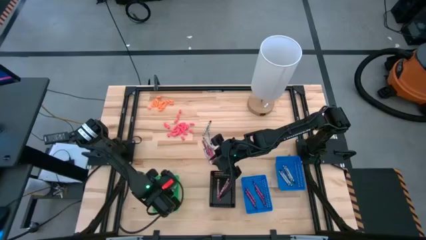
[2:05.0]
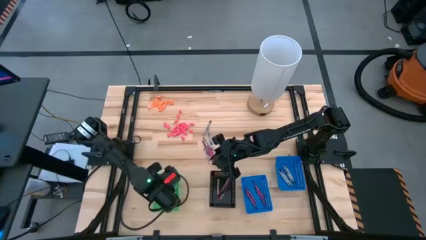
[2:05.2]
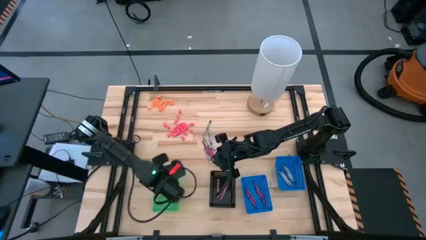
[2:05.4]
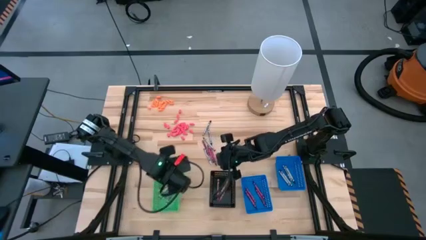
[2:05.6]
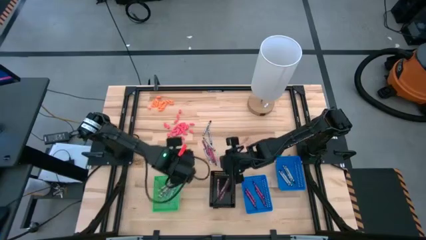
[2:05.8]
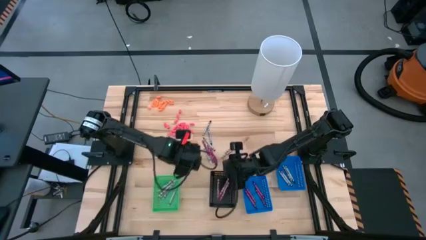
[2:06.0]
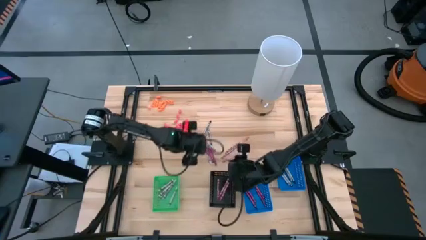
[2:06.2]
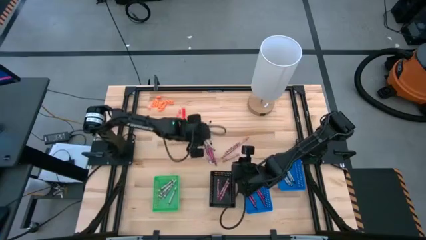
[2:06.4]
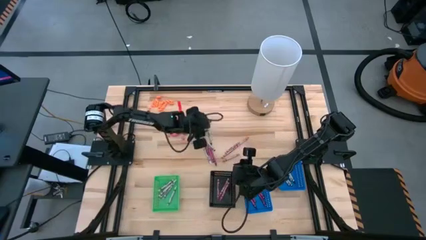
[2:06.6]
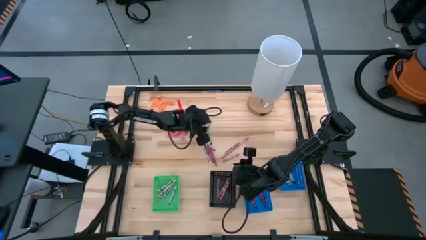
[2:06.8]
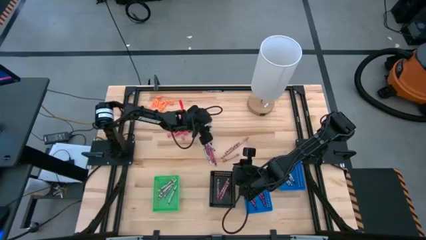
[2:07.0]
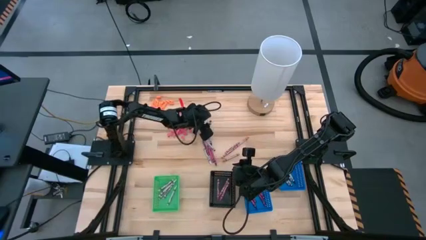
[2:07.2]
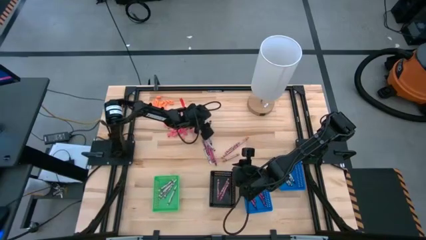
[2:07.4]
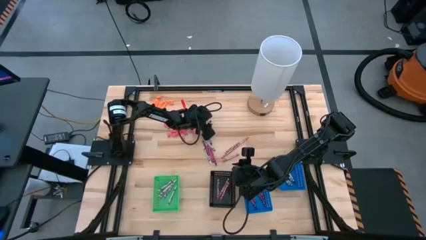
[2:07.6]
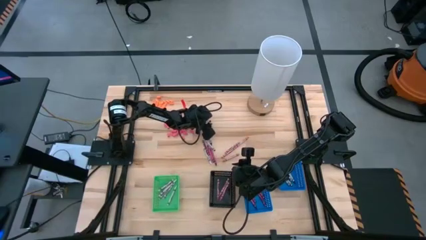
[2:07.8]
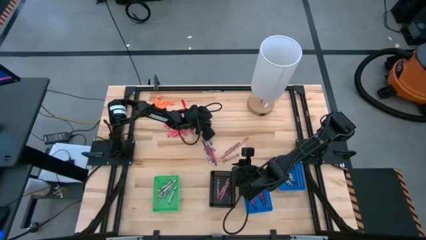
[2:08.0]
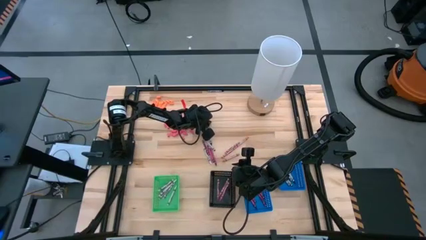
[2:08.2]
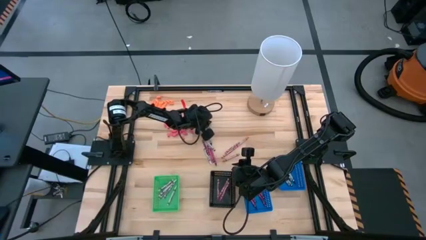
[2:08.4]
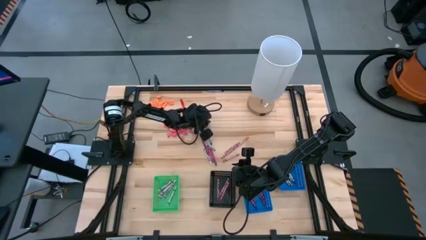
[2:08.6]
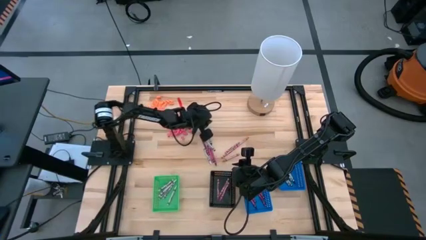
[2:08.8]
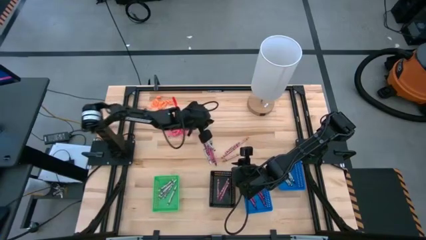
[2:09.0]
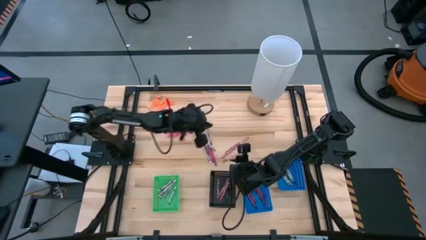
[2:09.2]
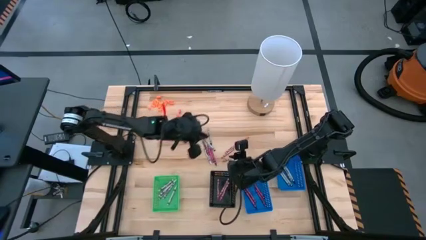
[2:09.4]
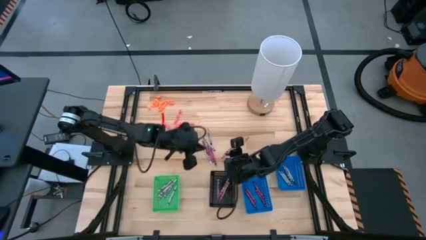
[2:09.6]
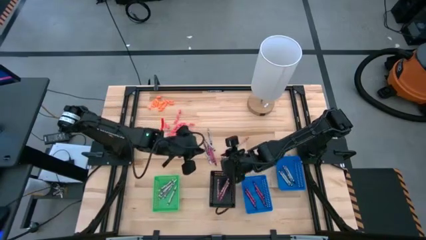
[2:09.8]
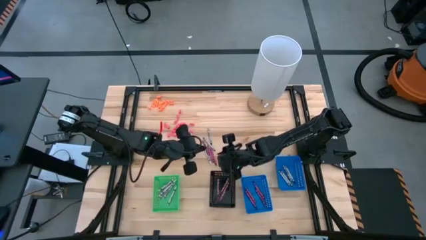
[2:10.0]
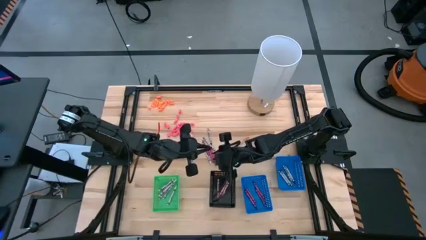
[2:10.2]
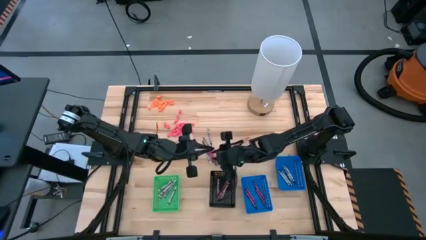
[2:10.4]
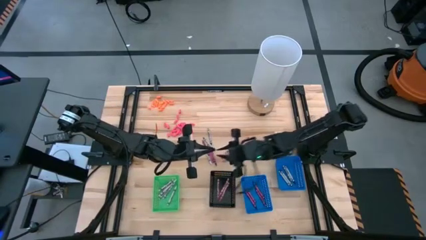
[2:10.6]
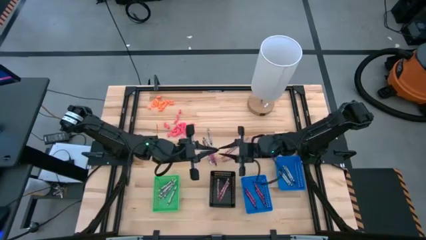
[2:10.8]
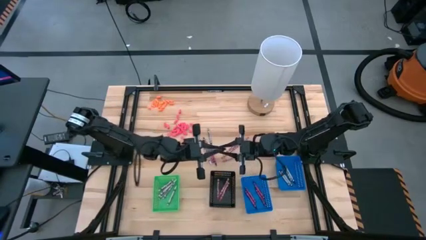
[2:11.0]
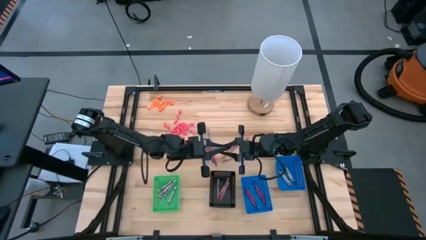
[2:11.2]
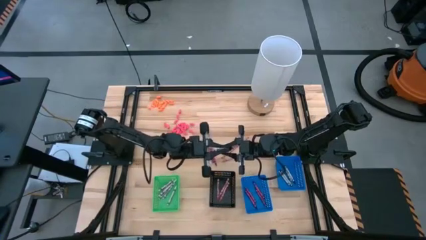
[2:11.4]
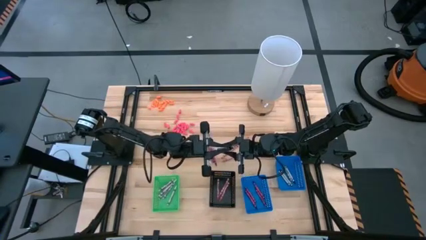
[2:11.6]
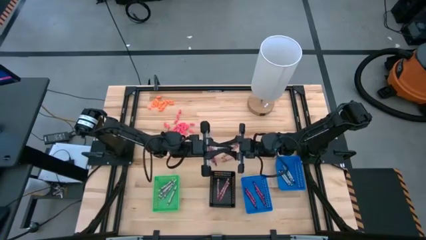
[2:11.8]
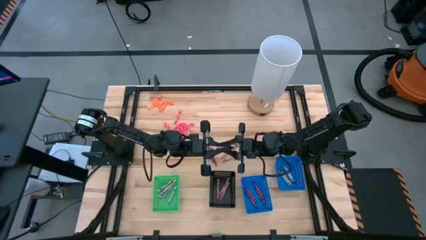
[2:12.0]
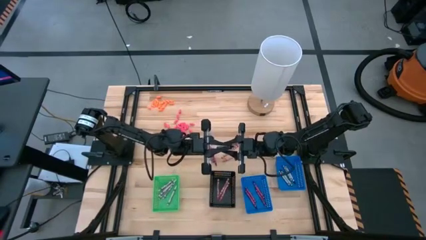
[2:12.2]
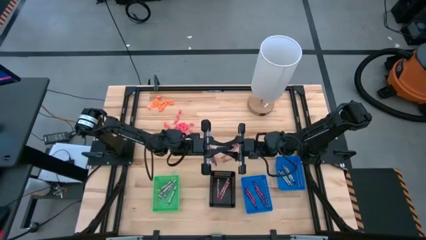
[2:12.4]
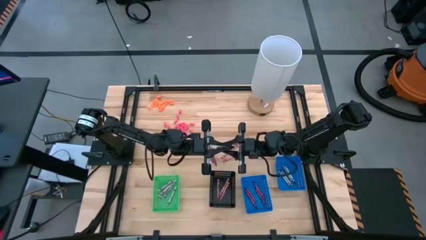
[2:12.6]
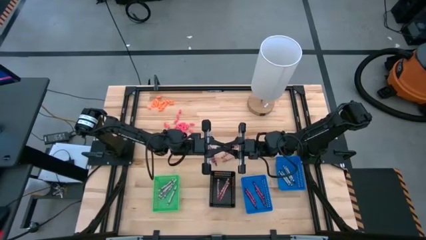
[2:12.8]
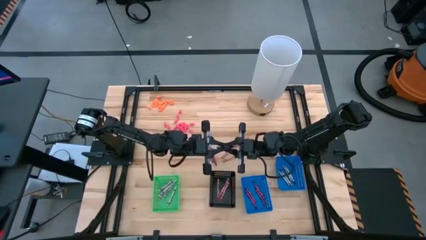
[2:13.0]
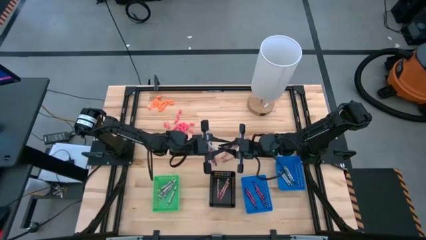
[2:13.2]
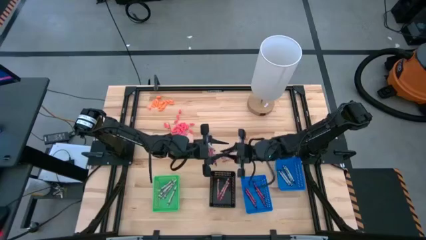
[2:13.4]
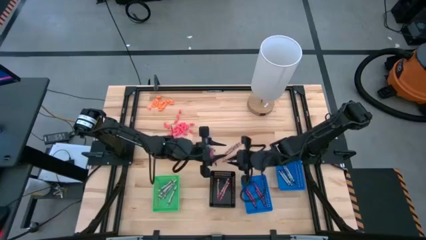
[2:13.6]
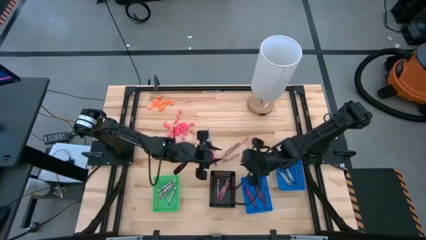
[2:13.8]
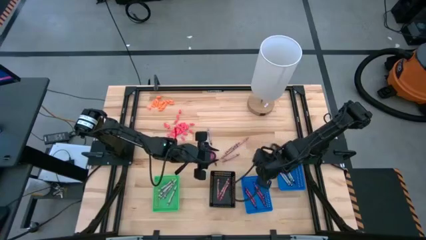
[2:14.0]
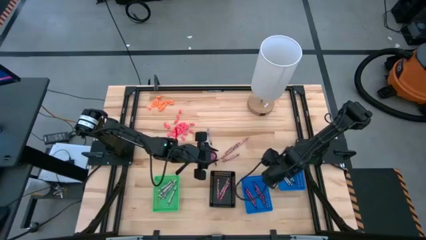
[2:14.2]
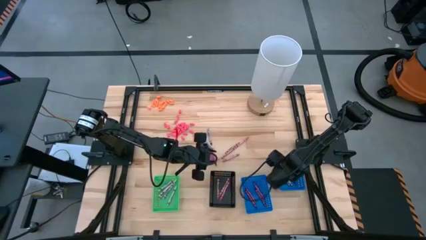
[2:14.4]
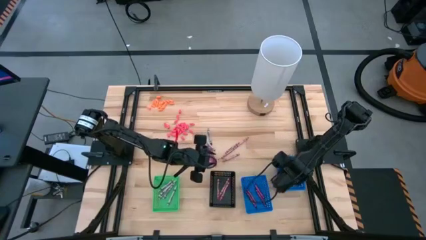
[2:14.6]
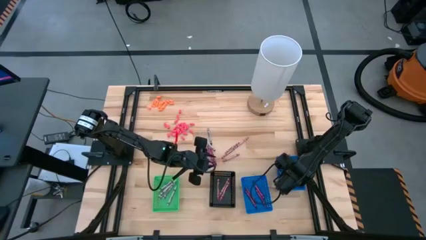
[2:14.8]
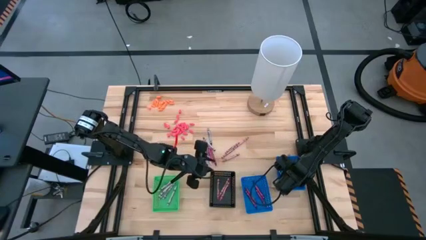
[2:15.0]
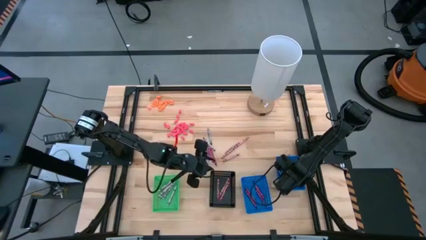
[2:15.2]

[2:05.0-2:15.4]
Task: Sort crayons
Put the black crayon into the right blue bin

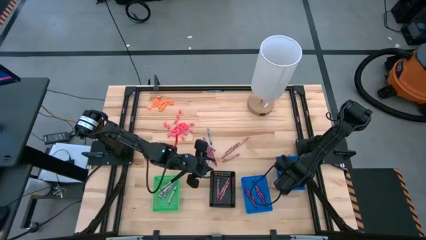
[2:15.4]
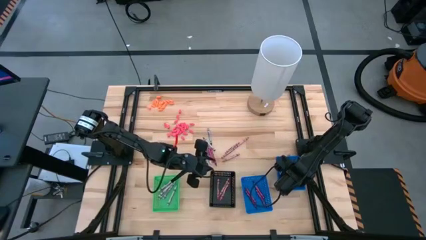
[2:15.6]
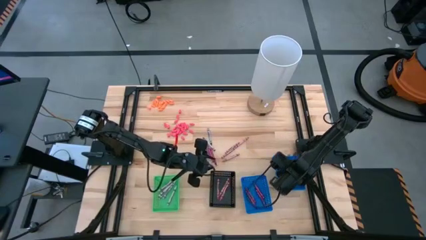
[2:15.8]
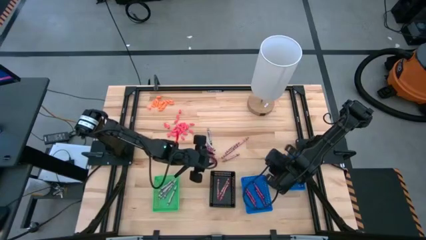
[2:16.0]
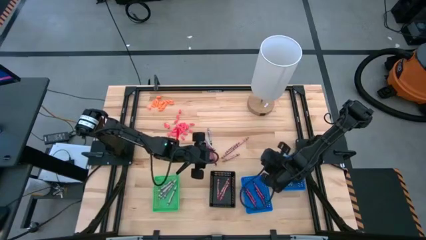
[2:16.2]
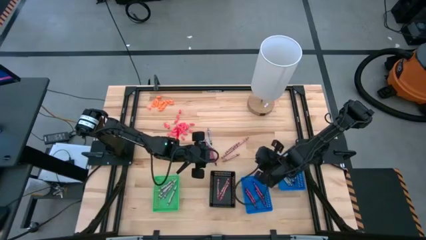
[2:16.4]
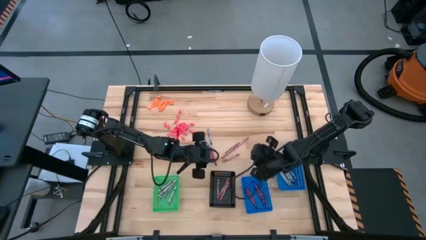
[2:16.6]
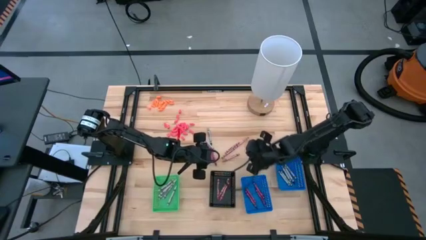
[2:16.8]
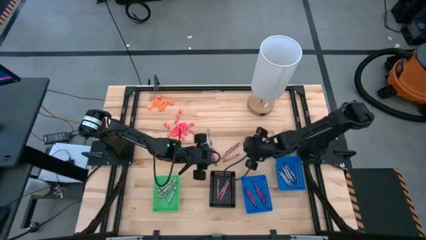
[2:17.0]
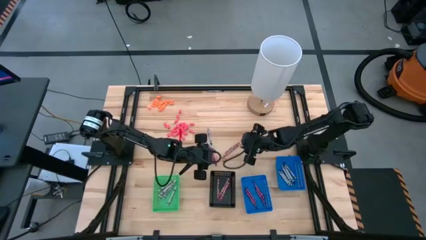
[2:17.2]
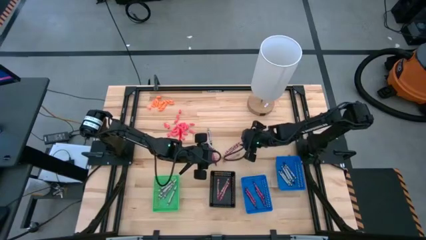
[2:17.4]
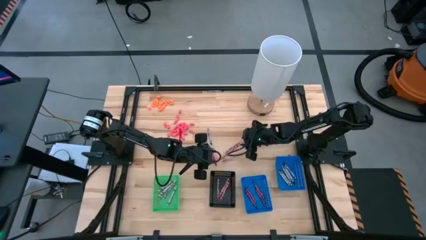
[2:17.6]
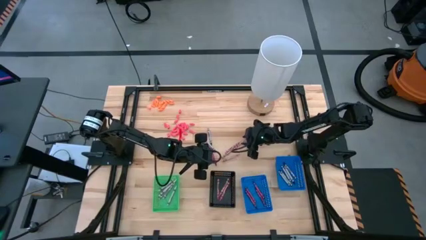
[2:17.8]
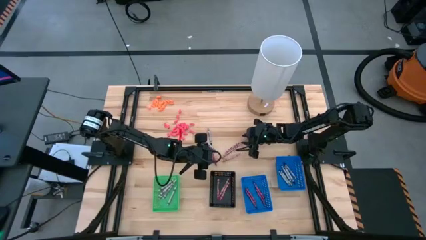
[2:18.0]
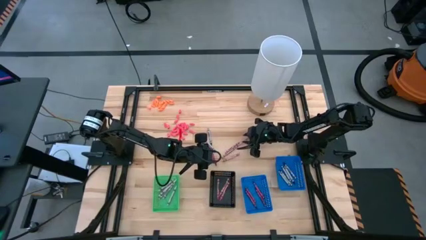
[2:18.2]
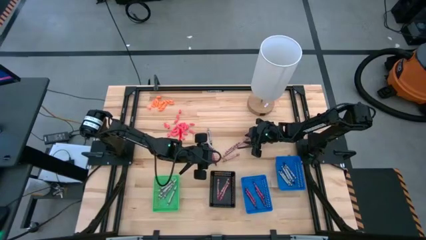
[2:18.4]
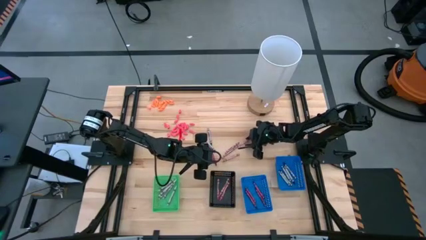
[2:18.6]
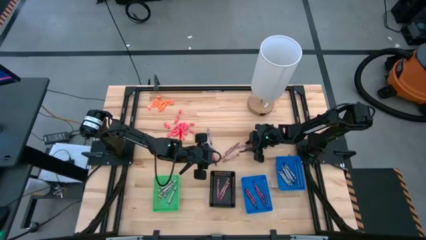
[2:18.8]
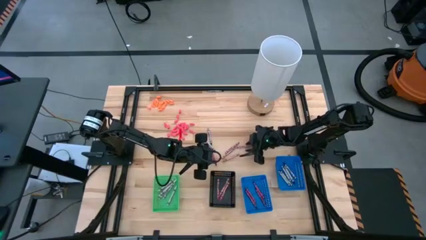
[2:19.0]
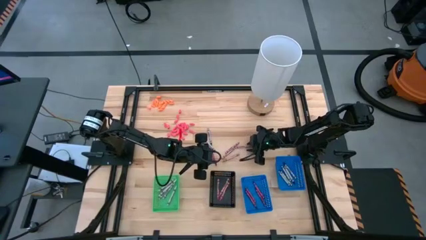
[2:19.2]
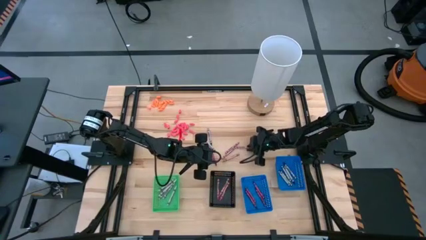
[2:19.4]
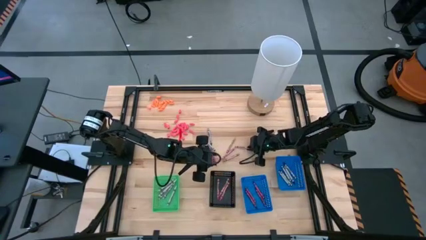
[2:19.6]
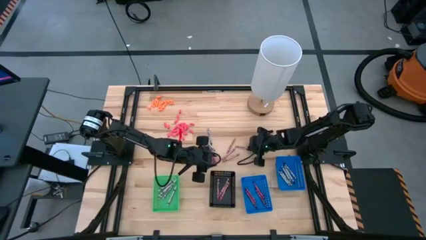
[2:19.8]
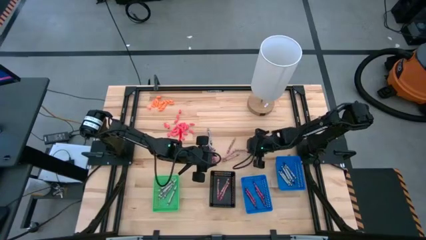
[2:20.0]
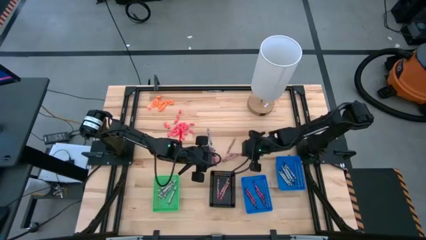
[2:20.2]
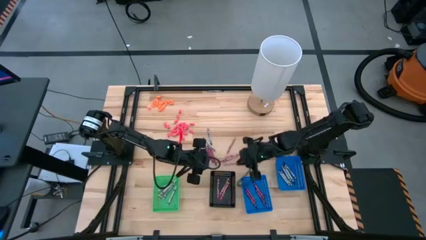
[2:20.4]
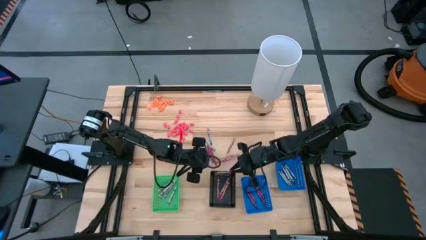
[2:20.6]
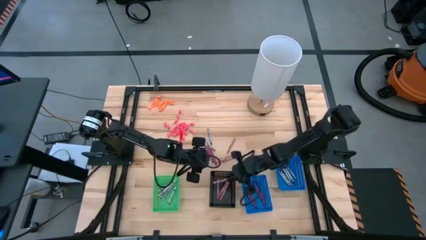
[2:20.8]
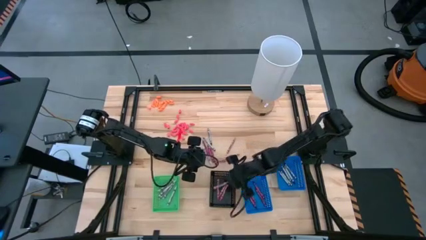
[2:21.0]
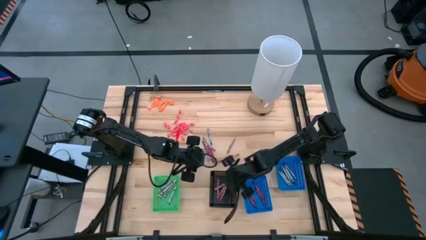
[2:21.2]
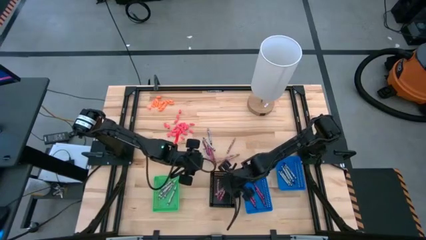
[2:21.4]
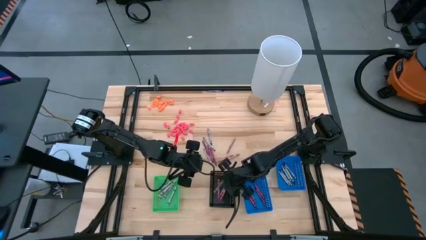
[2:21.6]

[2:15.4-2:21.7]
Put the pink crayon into the black bin
